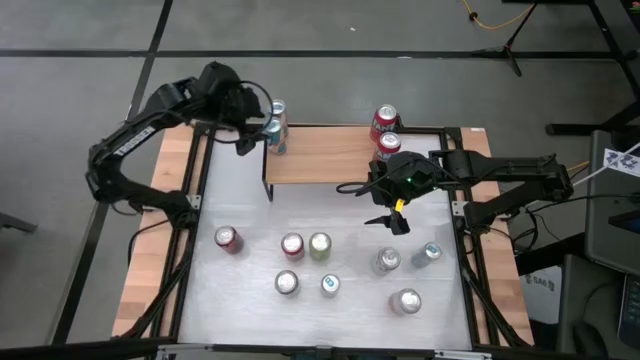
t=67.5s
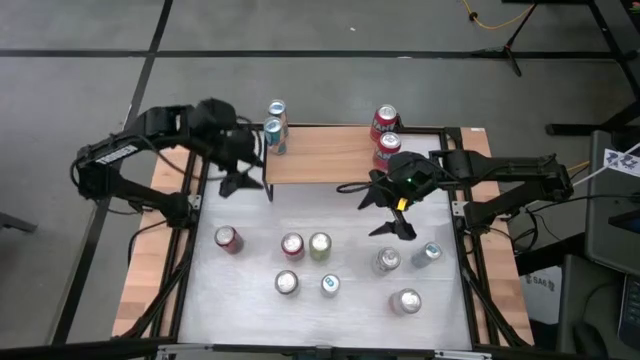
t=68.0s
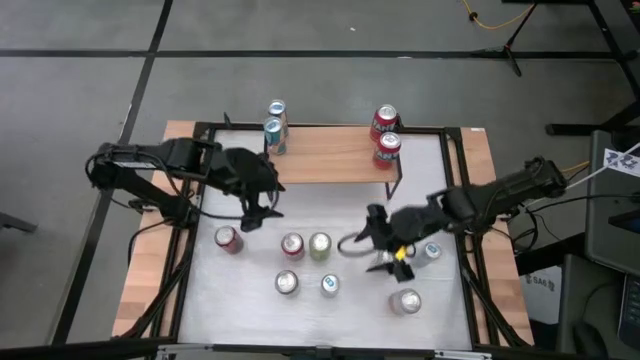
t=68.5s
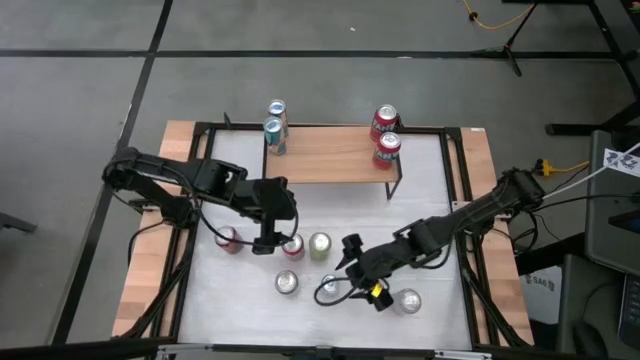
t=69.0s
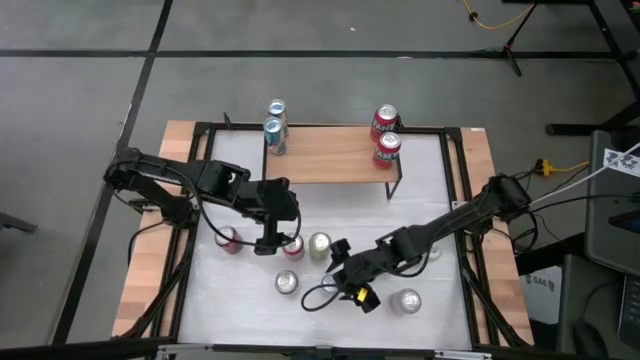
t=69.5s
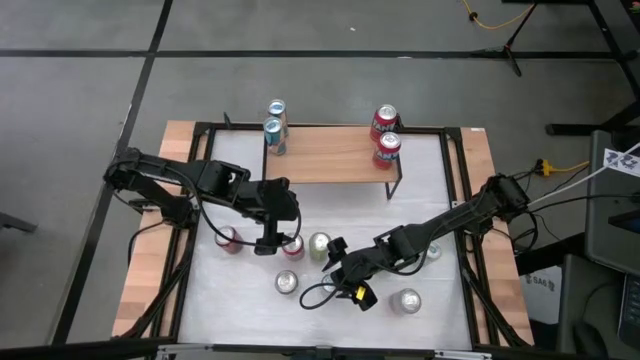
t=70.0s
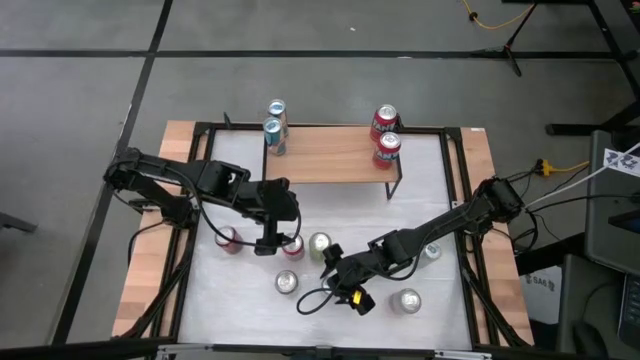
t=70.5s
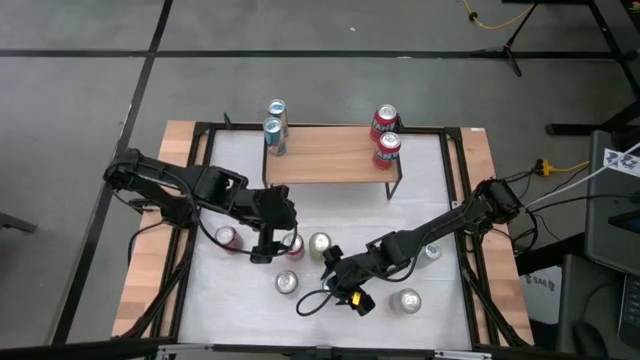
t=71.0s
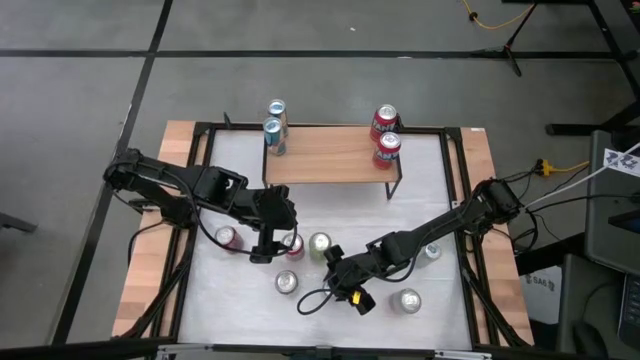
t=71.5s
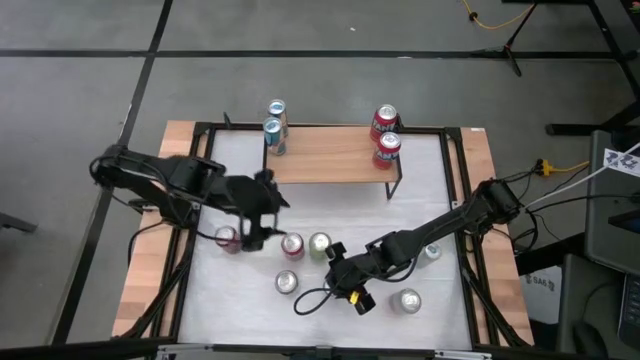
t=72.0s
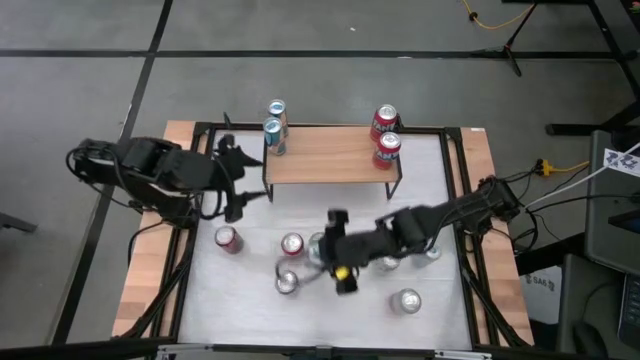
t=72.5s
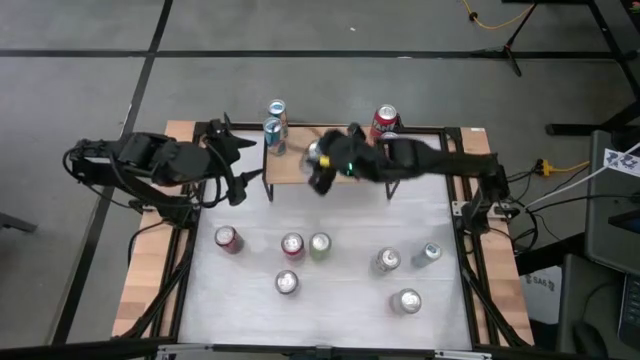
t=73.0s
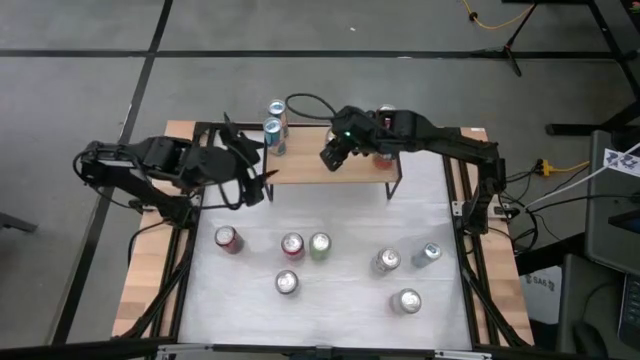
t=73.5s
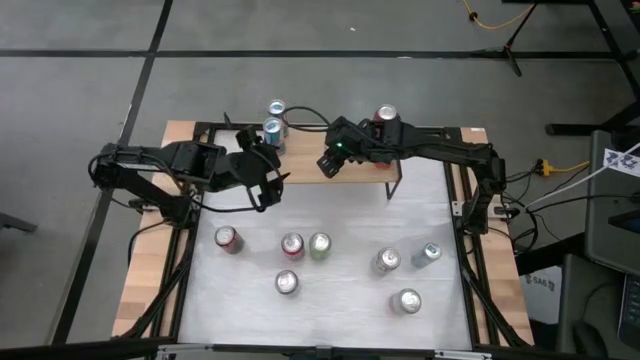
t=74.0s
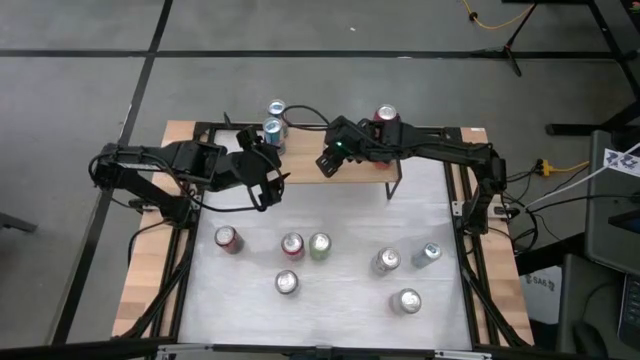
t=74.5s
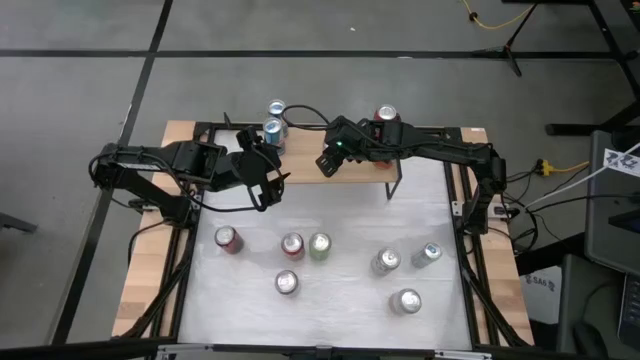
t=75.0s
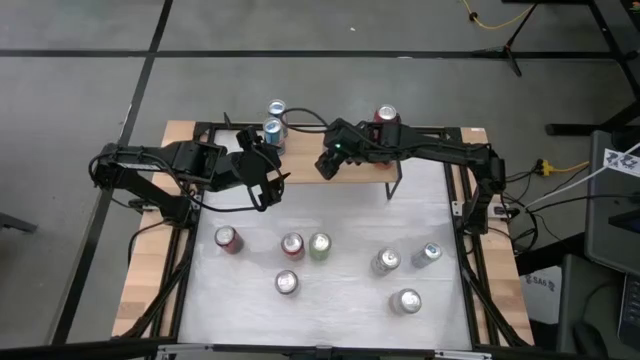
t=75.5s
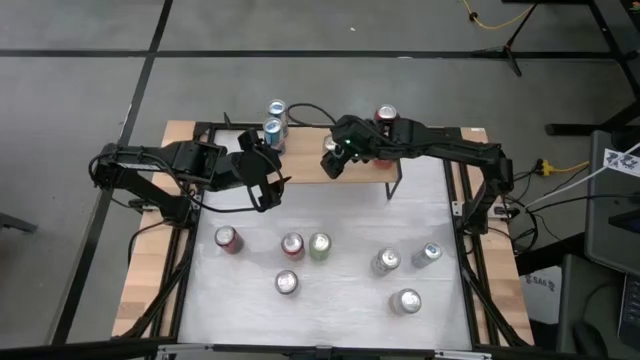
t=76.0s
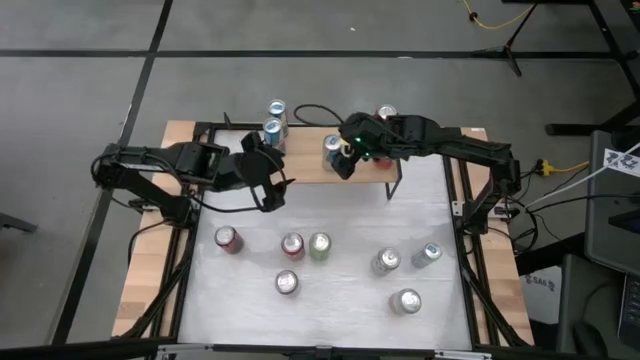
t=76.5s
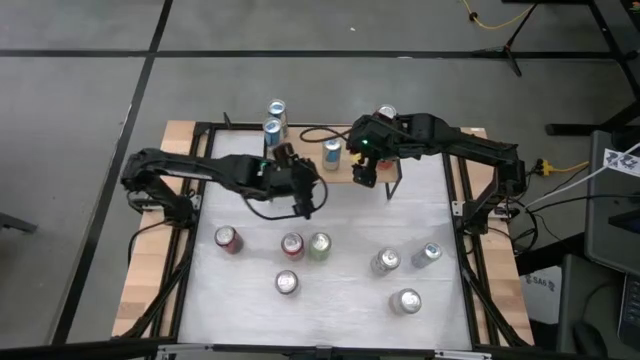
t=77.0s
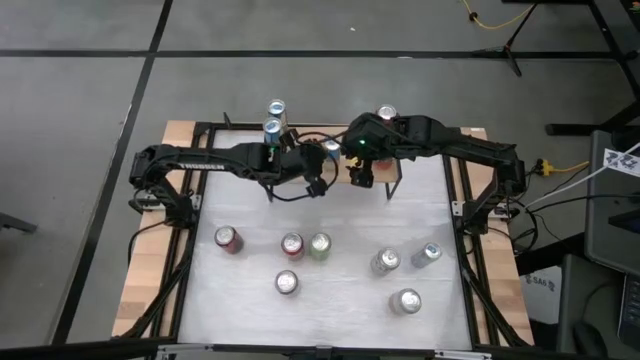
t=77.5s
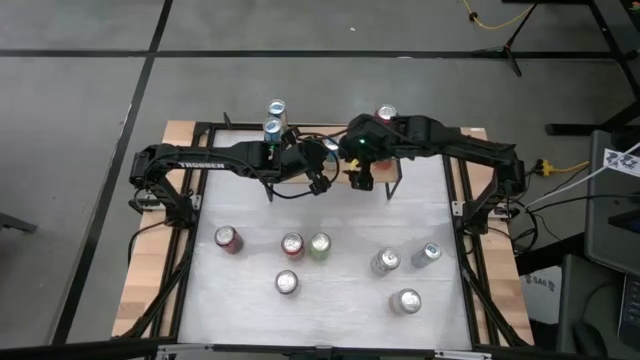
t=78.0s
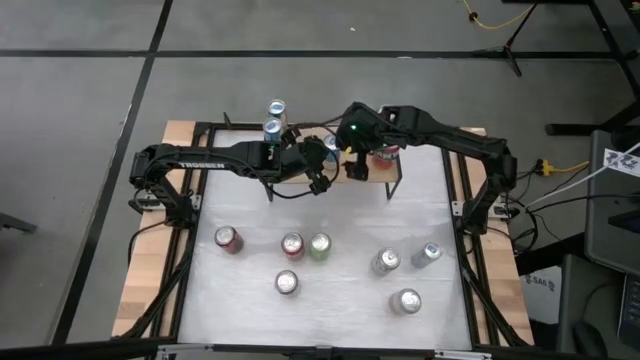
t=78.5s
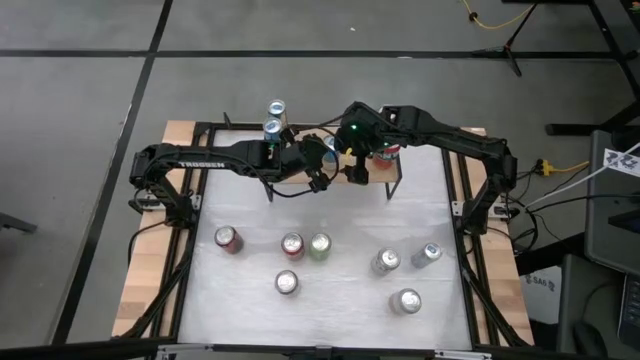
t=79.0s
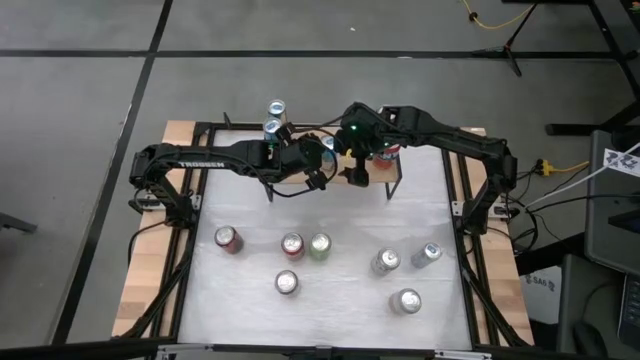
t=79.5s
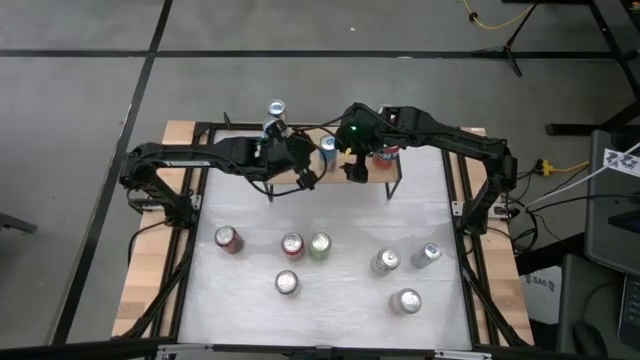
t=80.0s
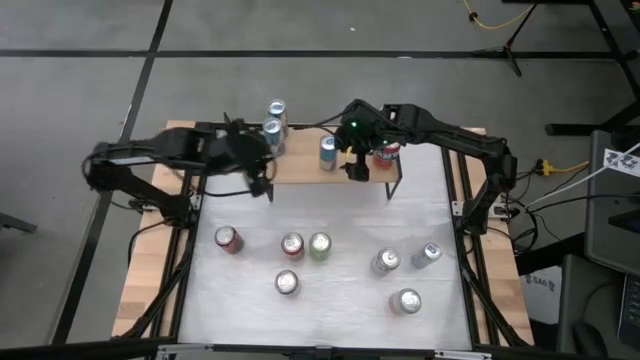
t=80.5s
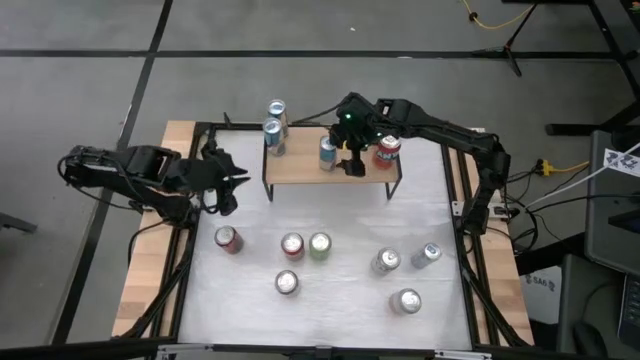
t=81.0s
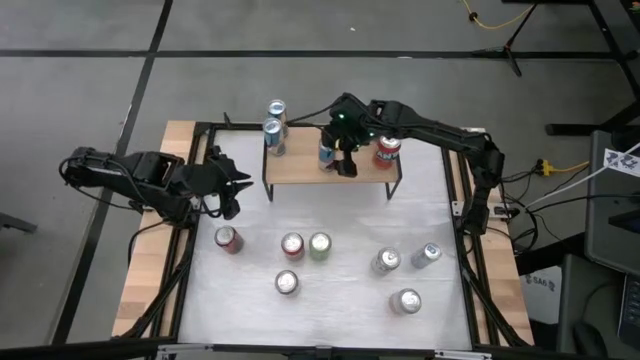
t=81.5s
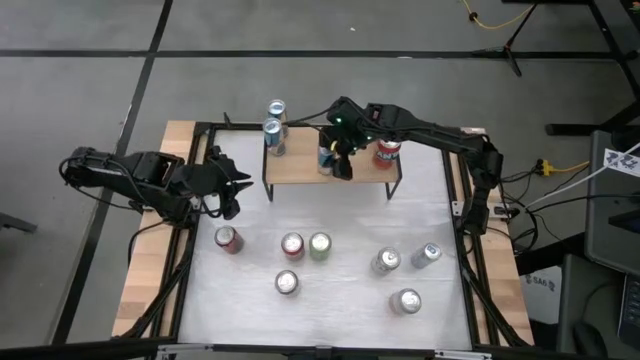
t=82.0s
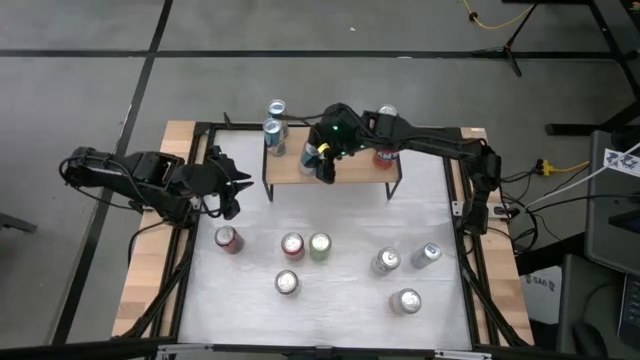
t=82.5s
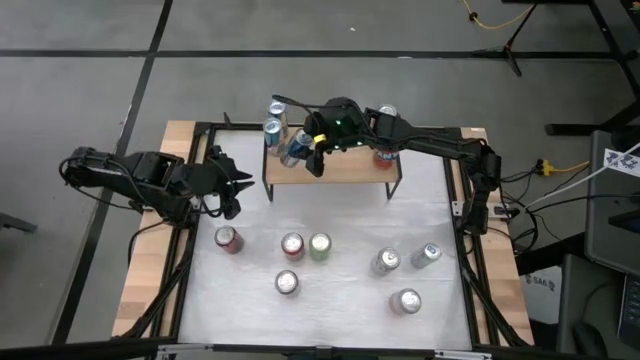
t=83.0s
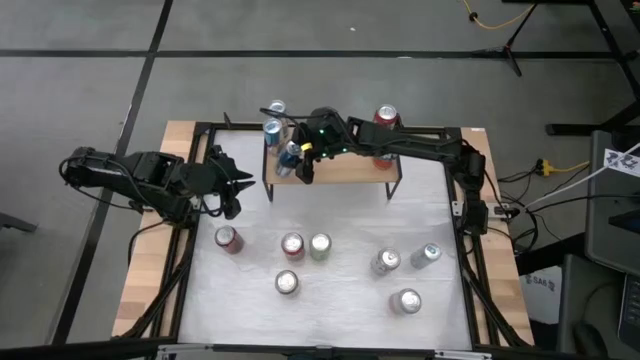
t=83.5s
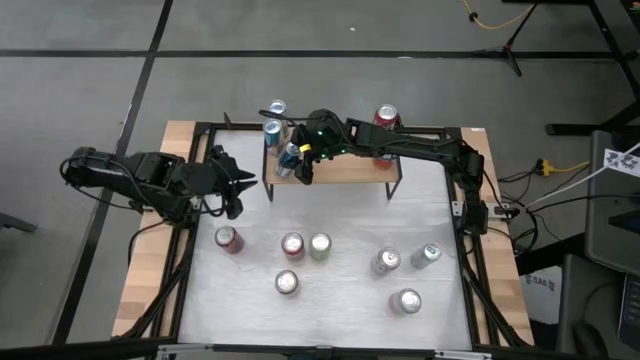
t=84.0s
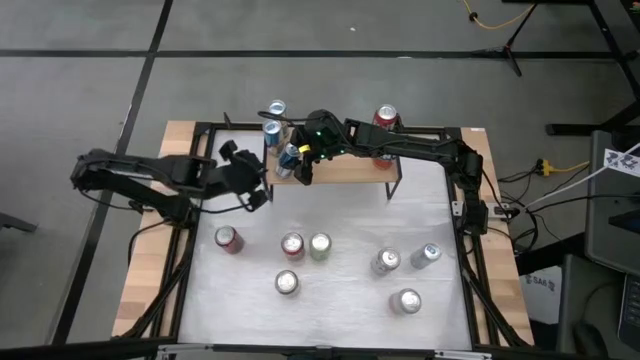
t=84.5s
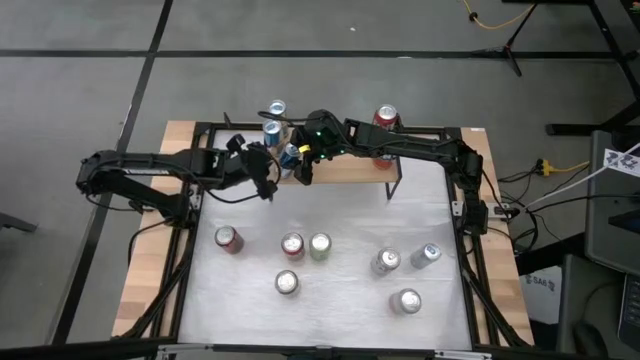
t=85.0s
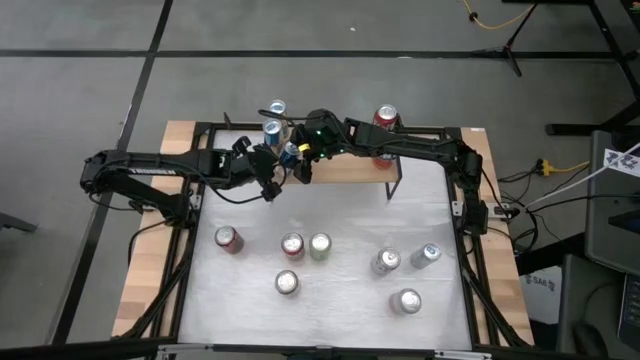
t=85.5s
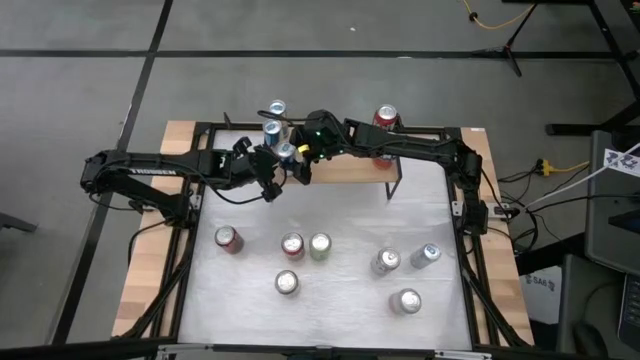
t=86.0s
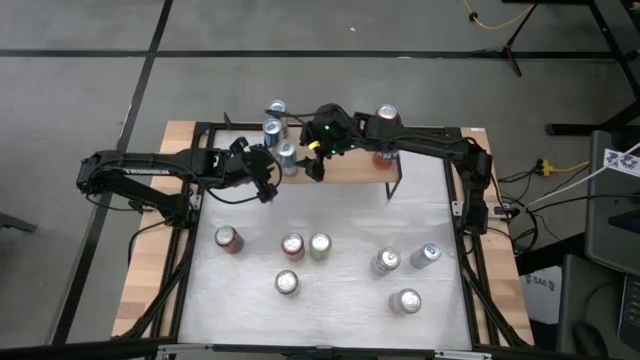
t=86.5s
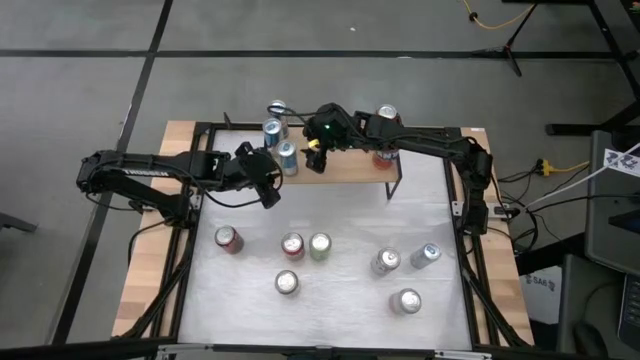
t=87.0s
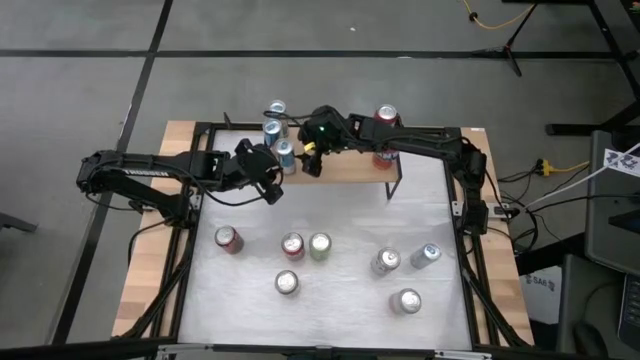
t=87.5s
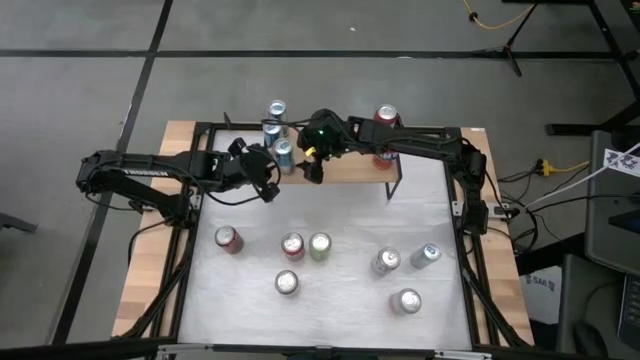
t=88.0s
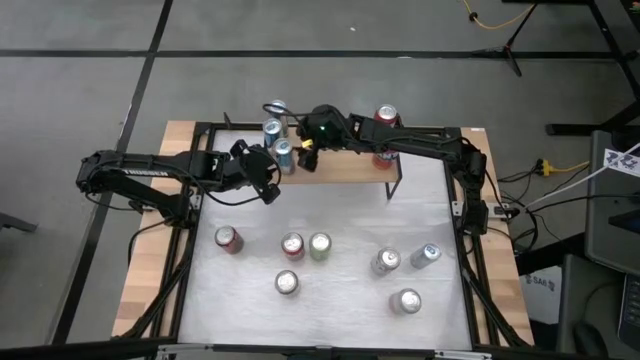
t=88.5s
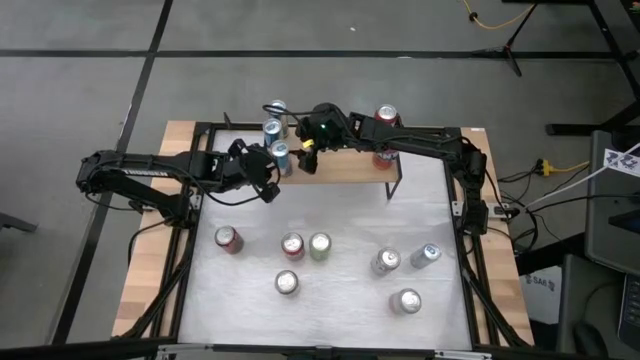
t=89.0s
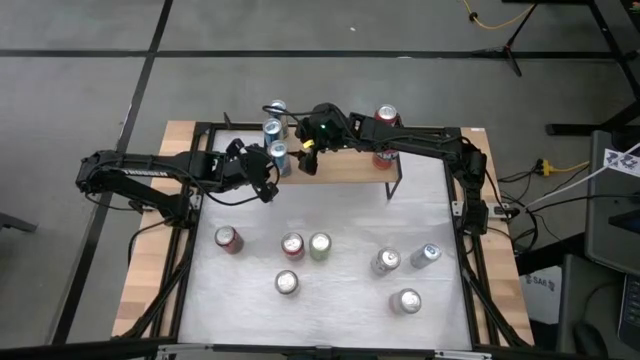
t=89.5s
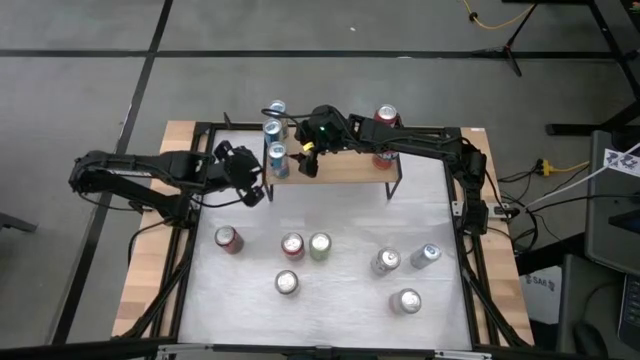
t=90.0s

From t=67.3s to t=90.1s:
Task: Sort soda cans
Put the left blue soda can on the shelf aligned with the blue soda cans
